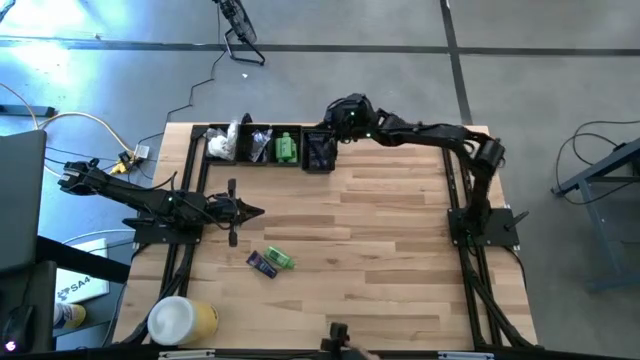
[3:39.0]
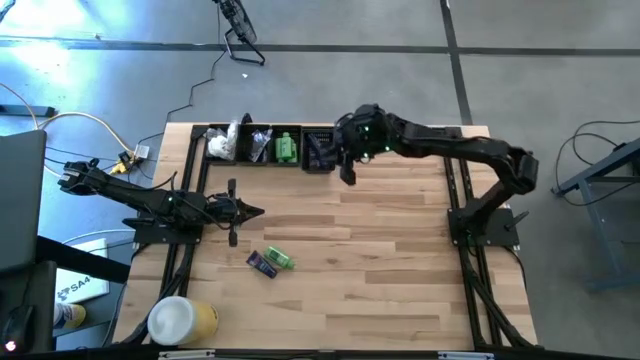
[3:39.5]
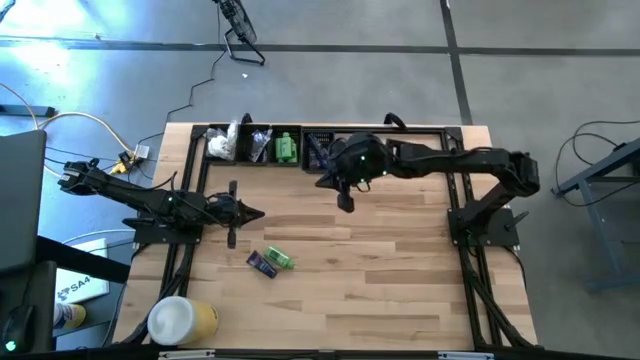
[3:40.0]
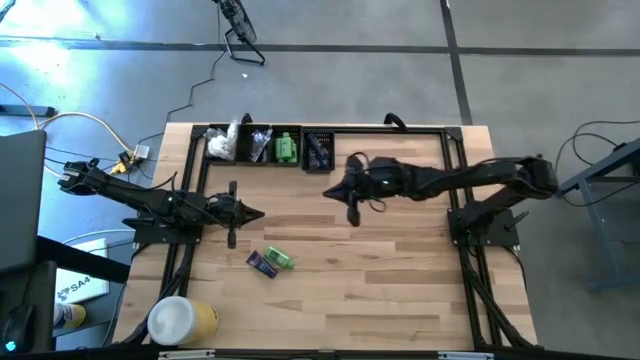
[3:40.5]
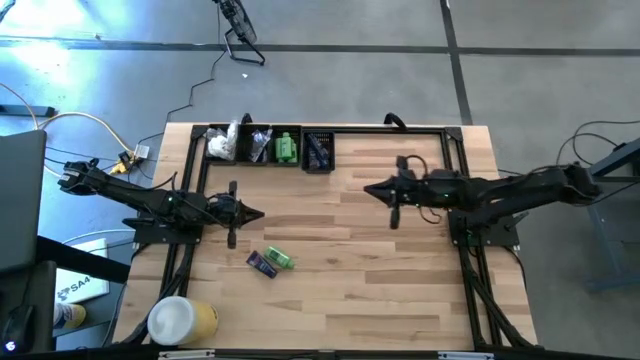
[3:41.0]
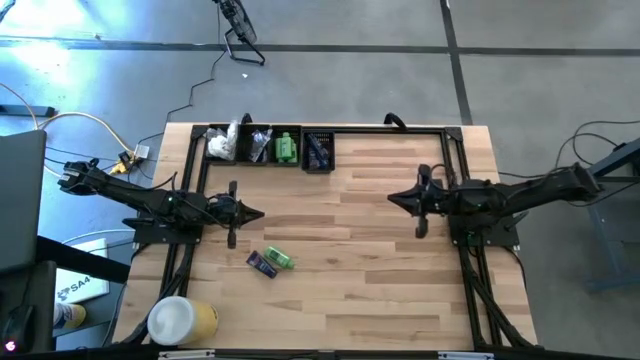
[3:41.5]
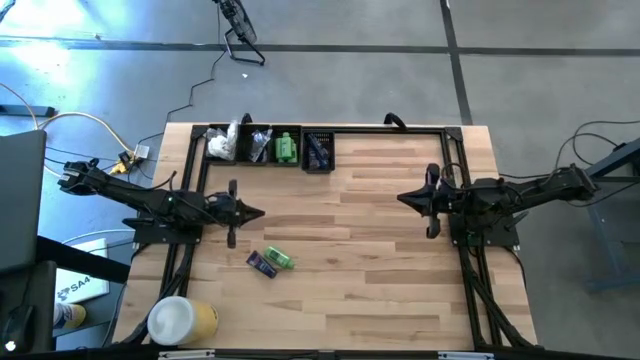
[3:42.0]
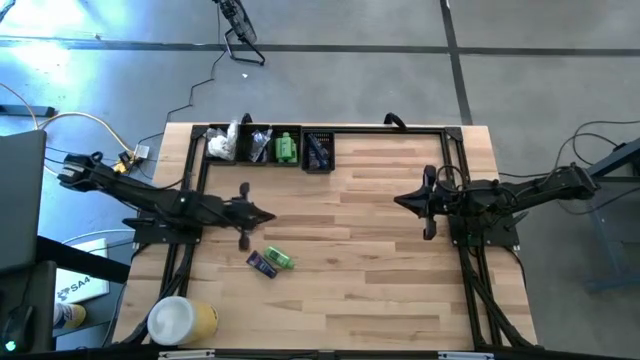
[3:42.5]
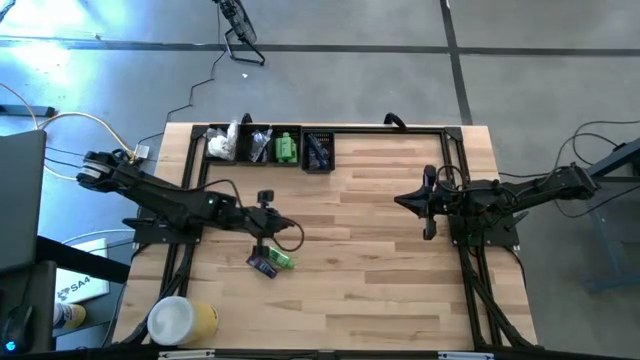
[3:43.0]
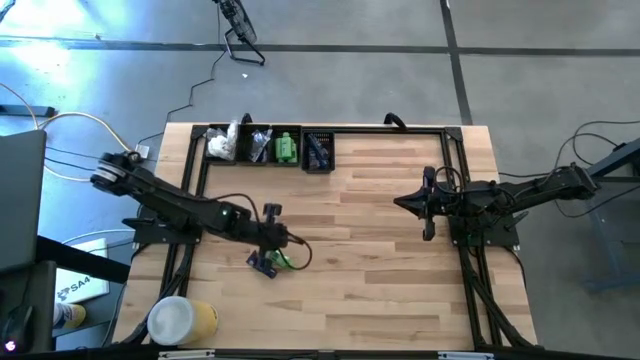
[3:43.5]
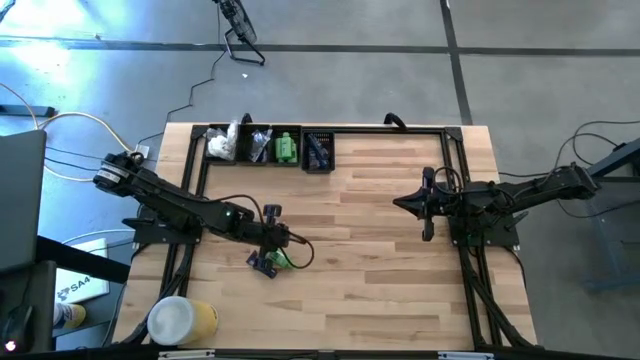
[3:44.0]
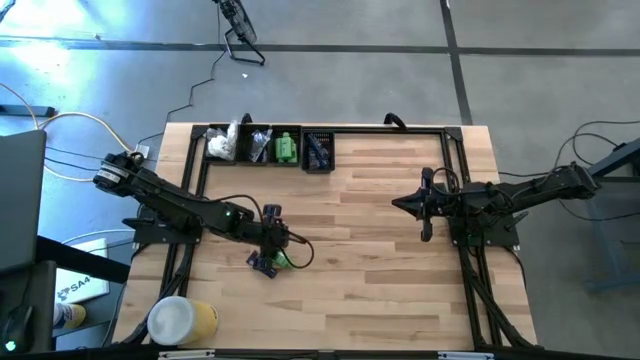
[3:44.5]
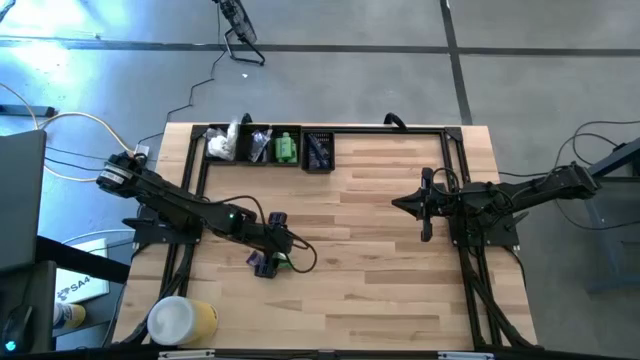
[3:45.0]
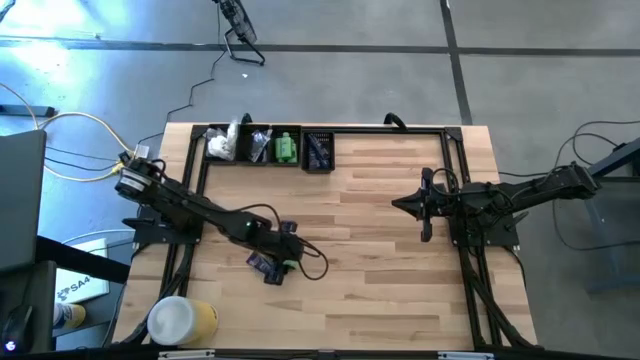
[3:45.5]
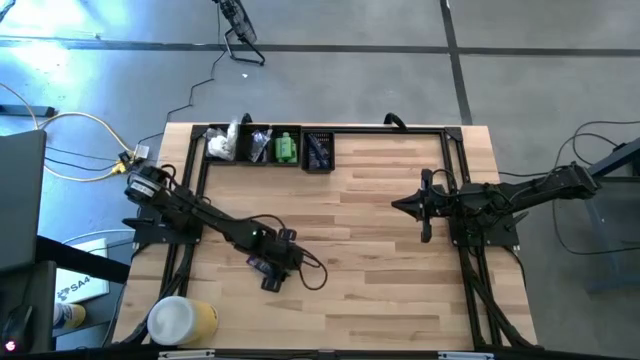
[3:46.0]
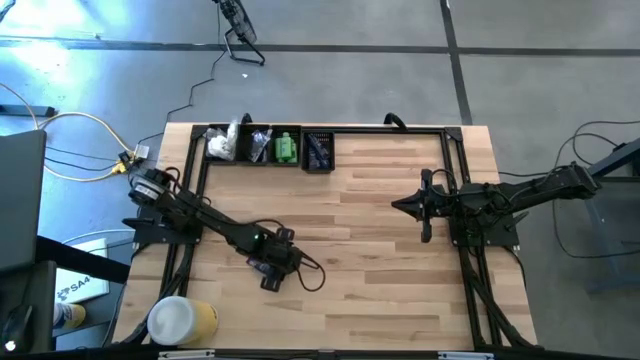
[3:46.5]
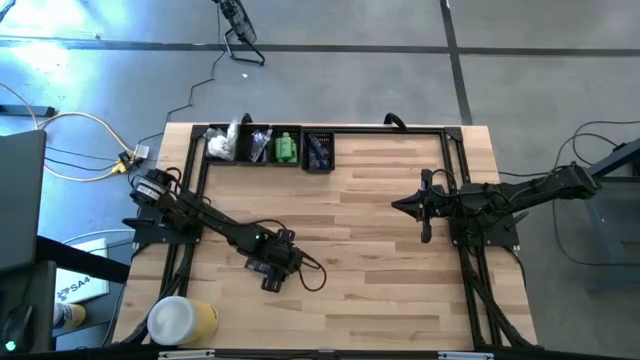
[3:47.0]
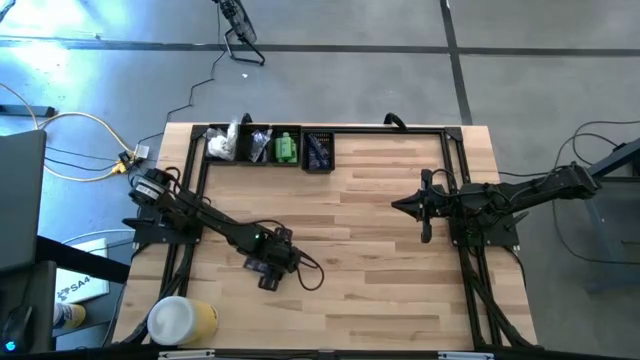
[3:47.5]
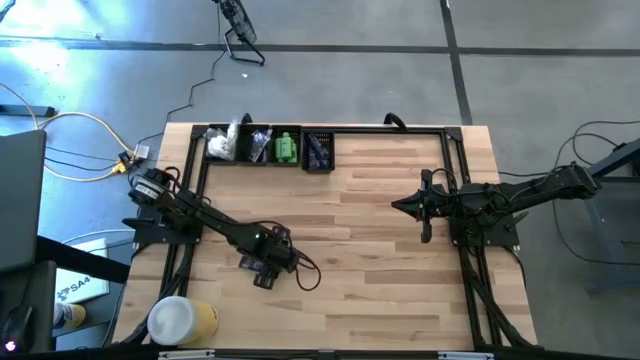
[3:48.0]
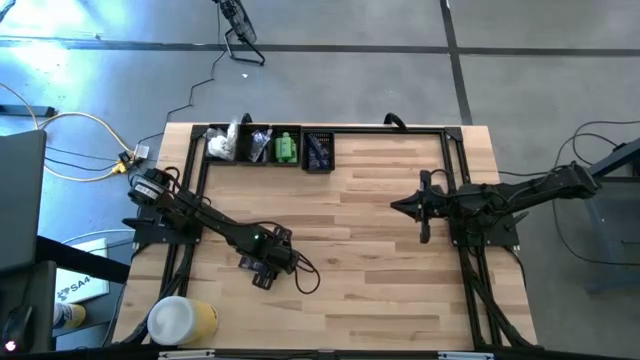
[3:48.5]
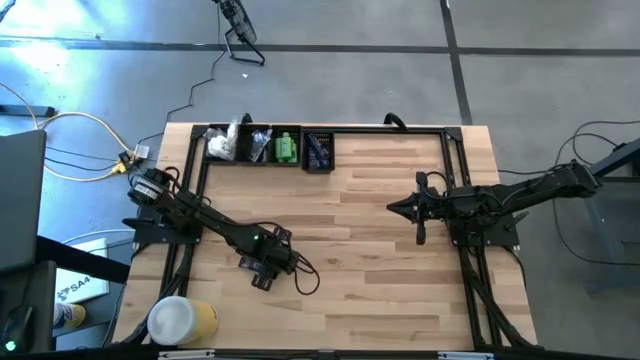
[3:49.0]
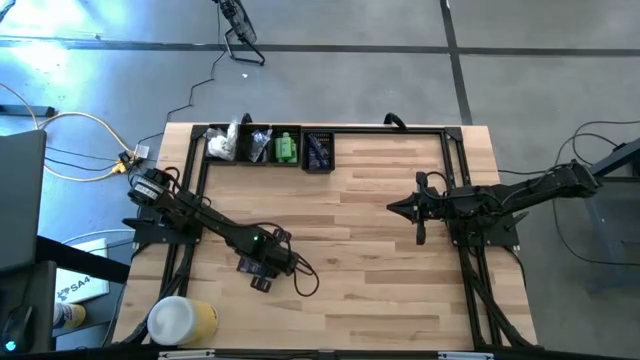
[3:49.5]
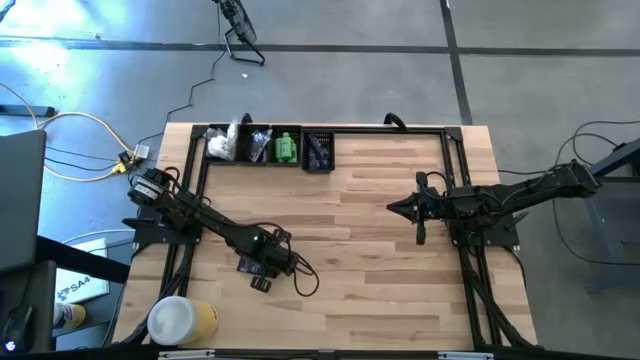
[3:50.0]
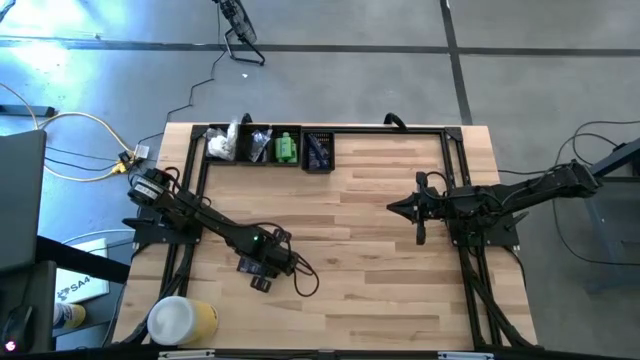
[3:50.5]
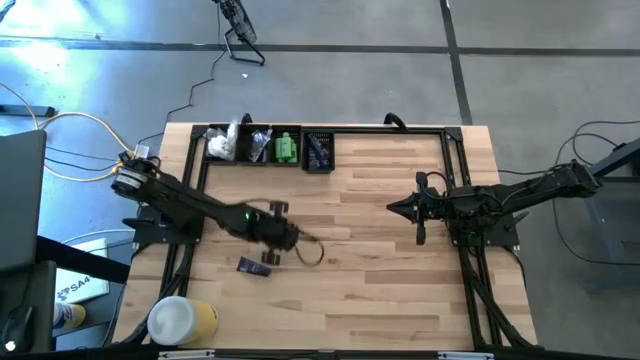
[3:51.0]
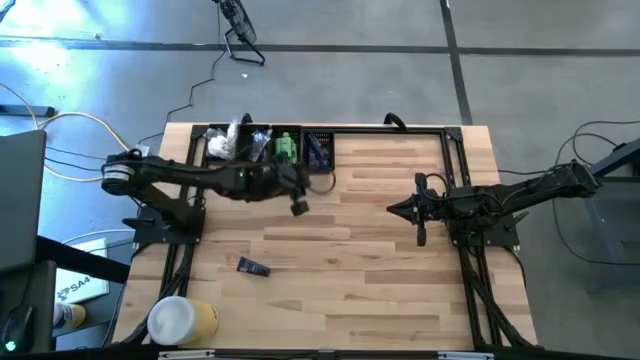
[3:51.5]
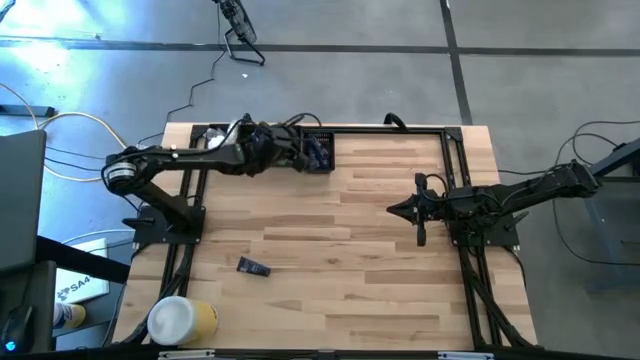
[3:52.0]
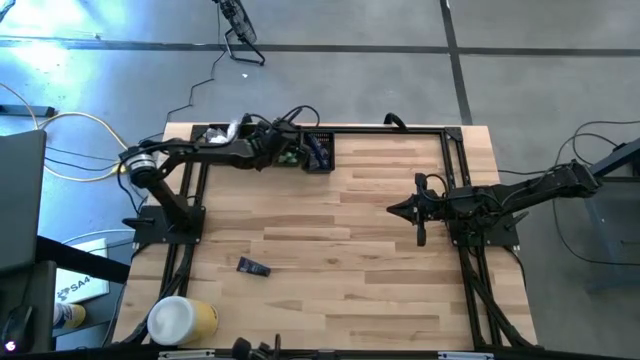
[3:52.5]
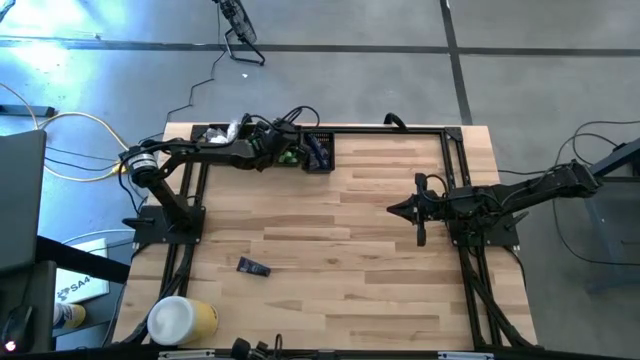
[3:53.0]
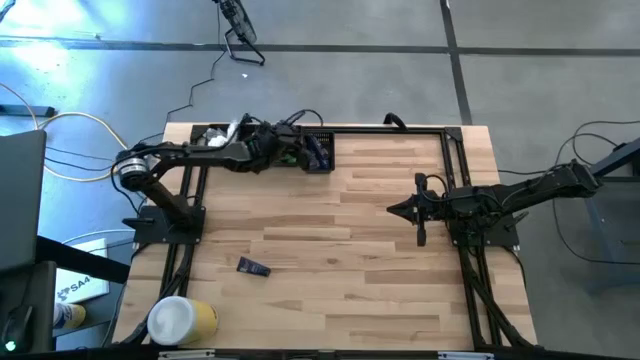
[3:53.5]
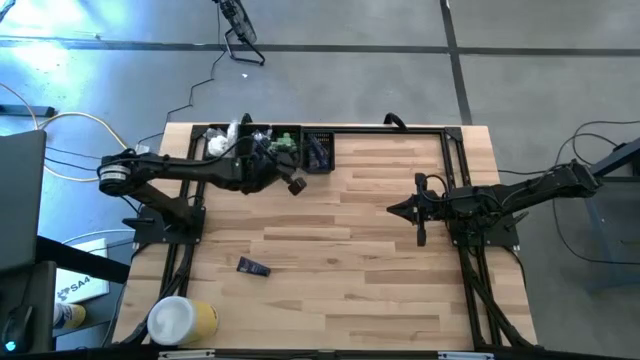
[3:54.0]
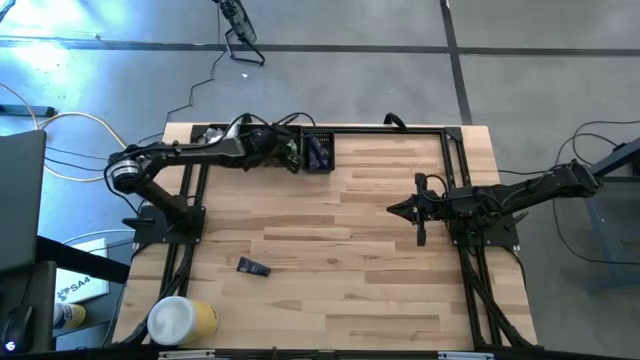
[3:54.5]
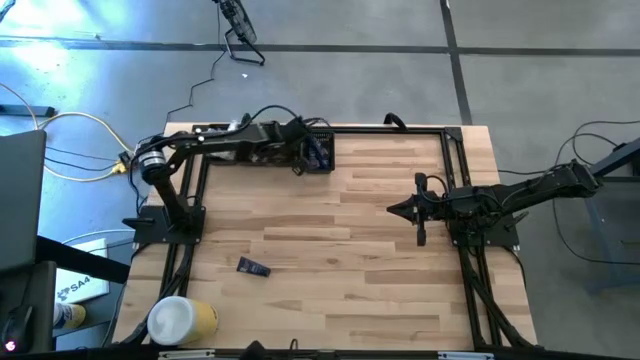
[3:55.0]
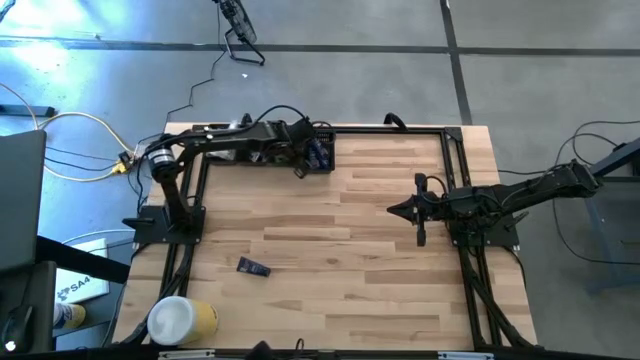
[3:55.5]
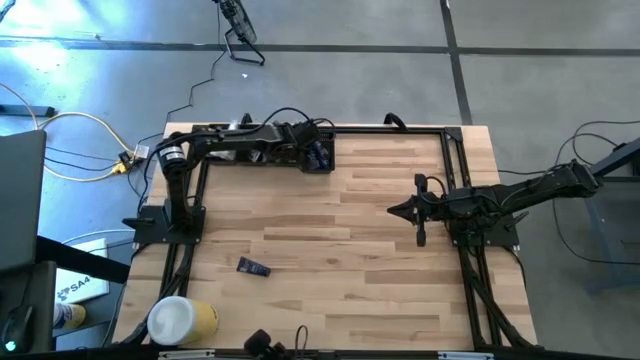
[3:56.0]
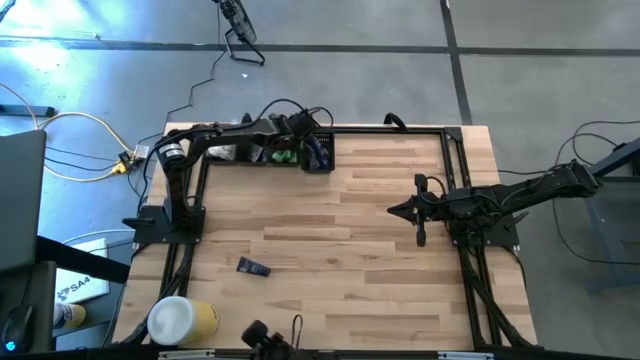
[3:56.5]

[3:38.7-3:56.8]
Task: Pick & Place Travel size toiletries
Put the shampoo into the middle right black bin

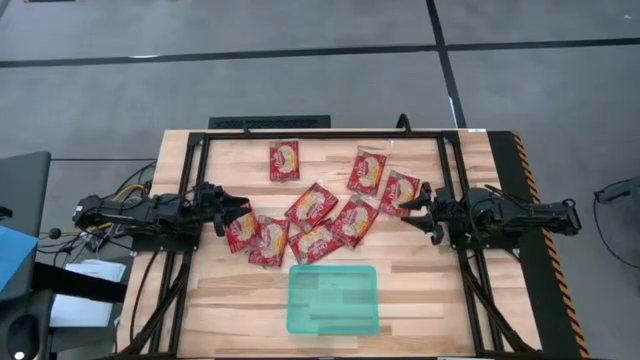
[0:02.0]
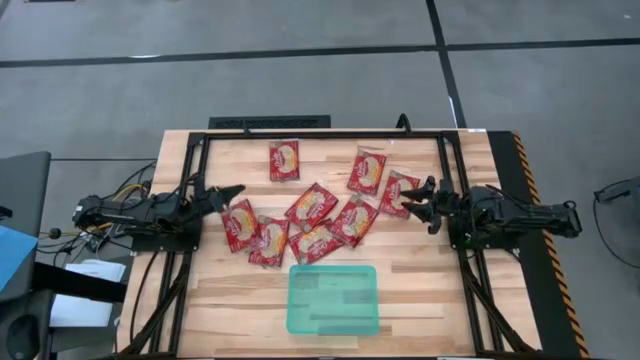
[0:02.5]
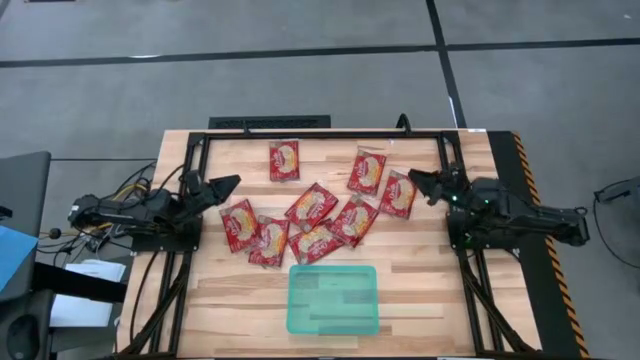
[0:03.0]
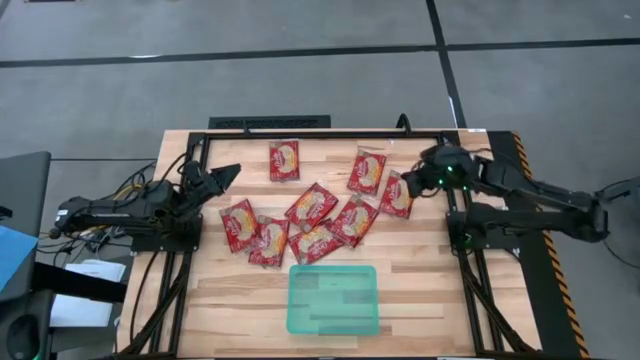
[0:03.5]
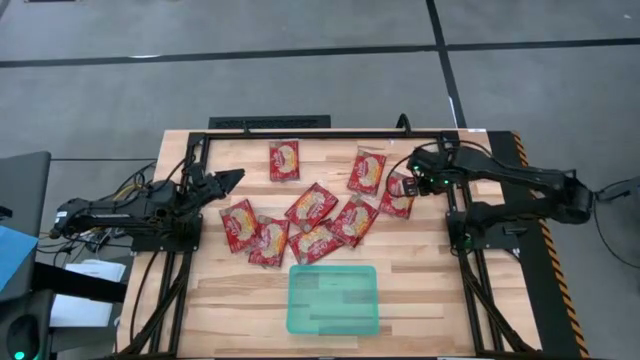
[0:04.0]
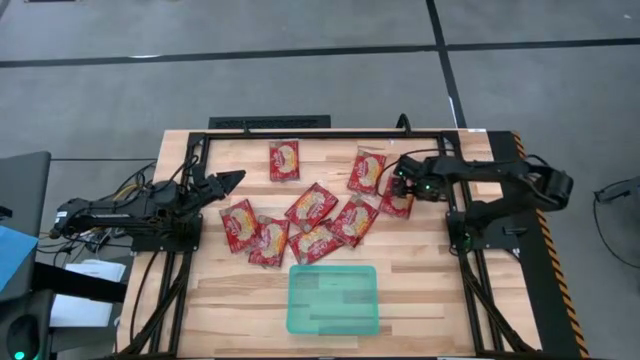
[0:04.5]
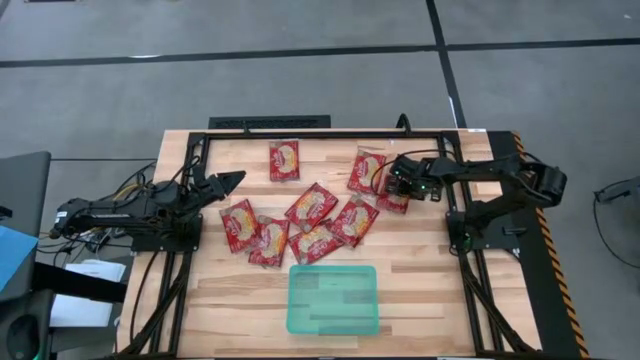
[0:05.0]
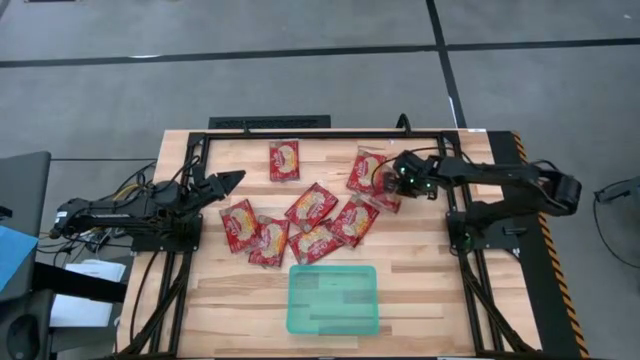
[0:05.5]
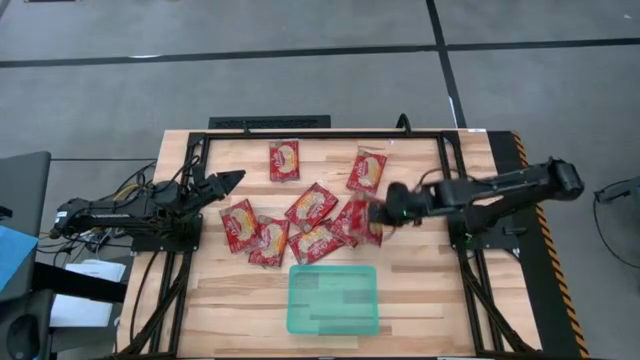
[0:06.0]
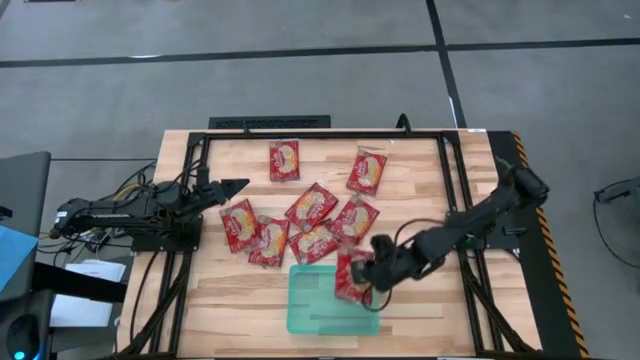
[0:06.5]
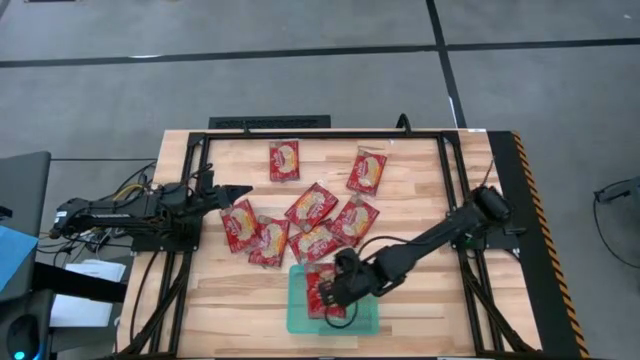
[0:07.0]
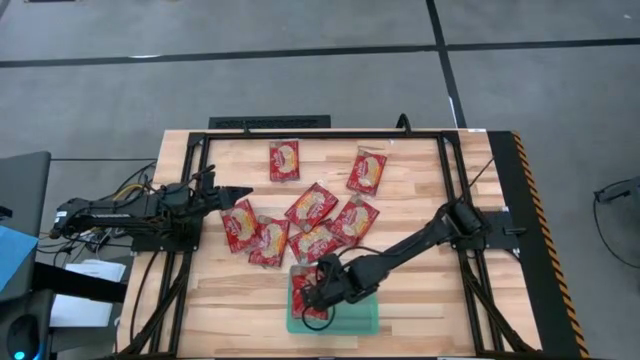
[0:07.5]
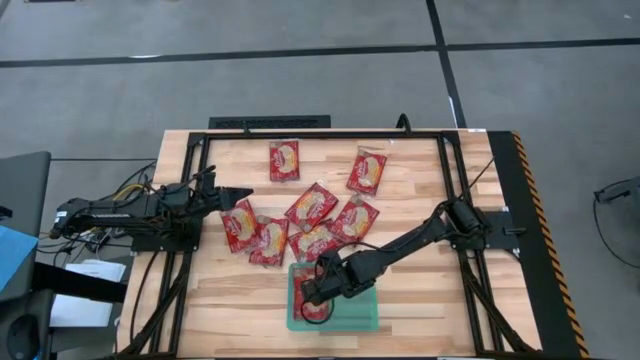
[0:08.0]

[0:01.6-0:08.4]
Task: Sort popcorn bags into baskets
Put the red popcorn bag into the green bin
